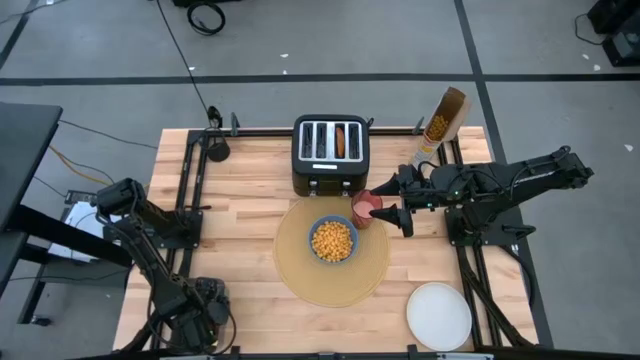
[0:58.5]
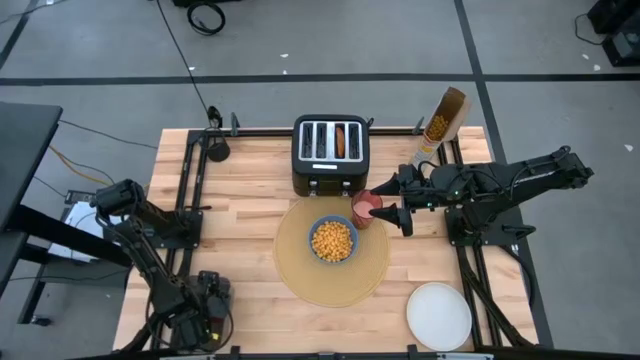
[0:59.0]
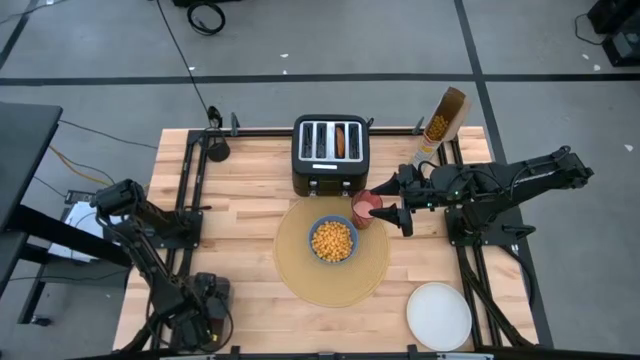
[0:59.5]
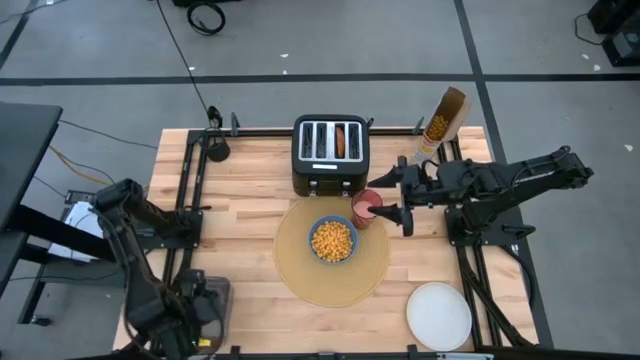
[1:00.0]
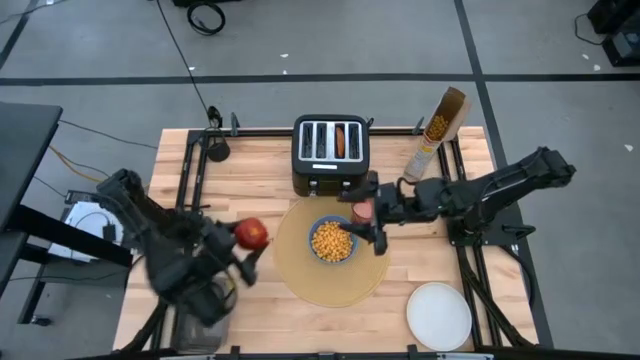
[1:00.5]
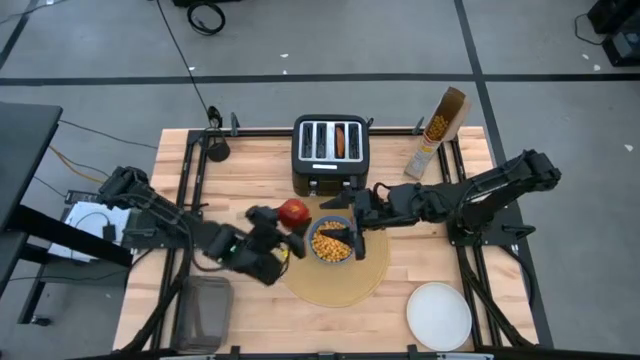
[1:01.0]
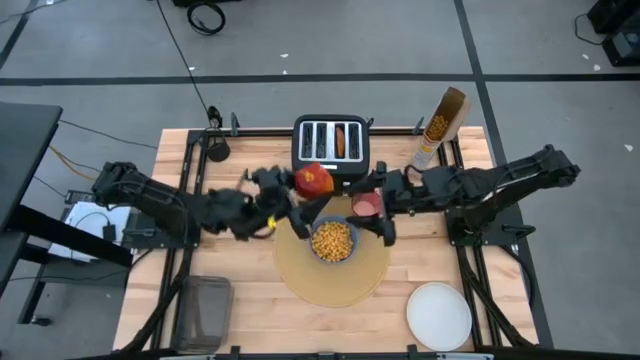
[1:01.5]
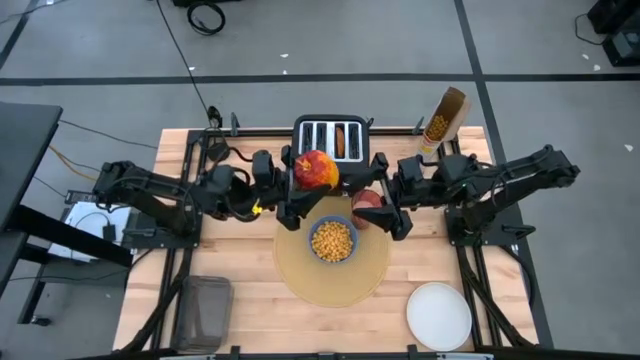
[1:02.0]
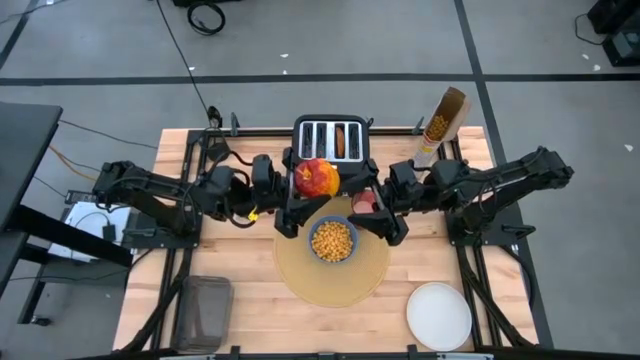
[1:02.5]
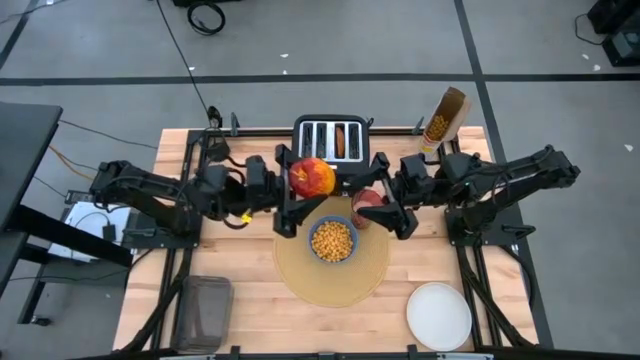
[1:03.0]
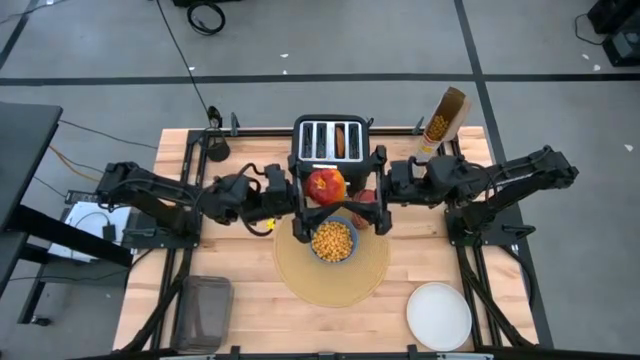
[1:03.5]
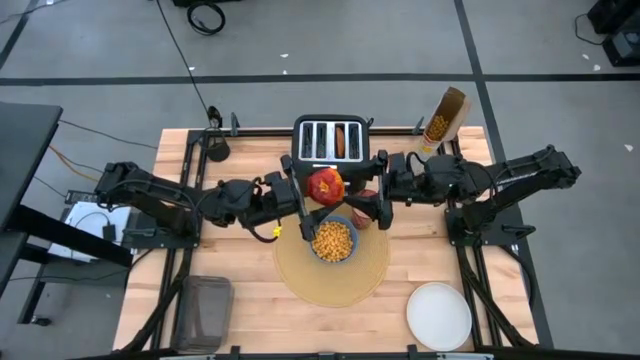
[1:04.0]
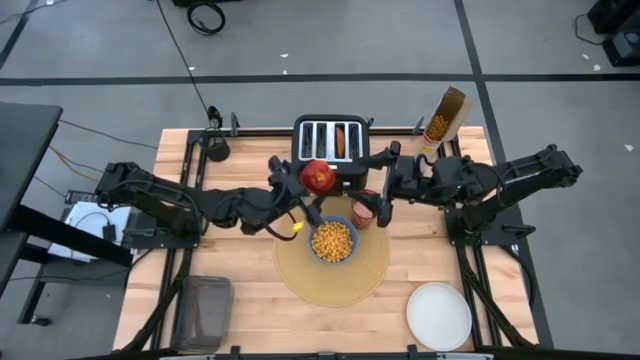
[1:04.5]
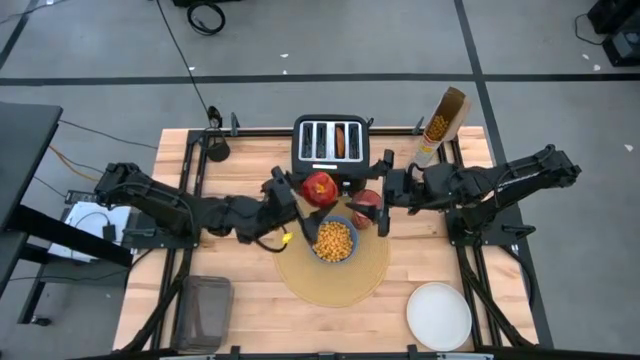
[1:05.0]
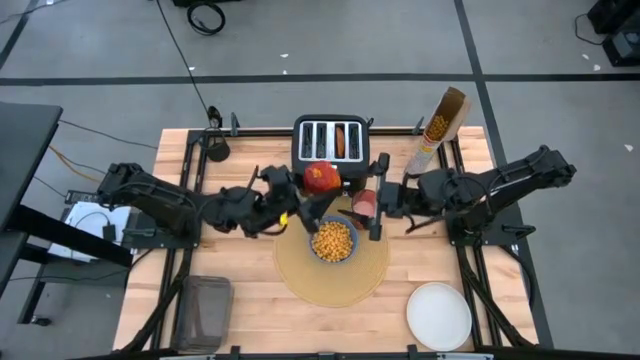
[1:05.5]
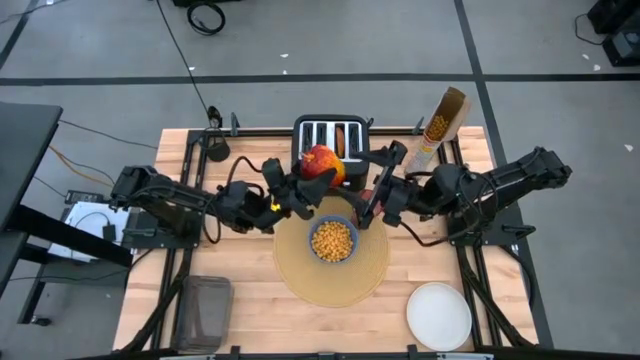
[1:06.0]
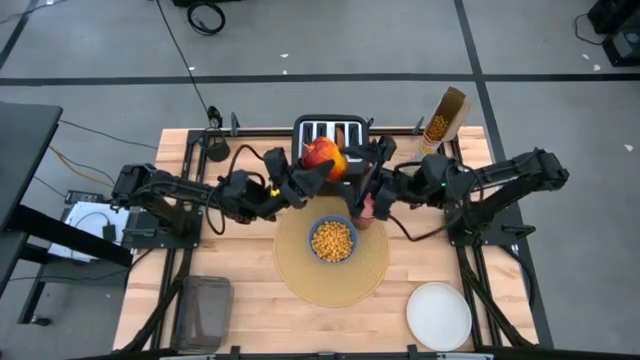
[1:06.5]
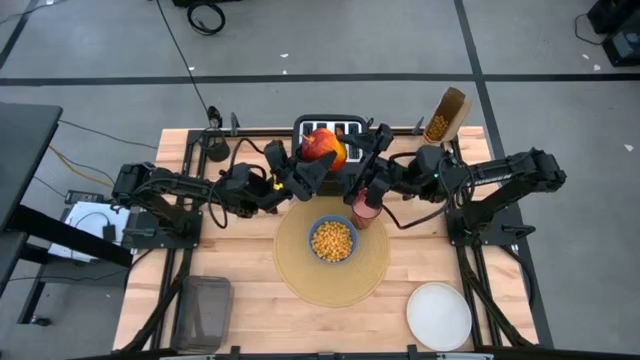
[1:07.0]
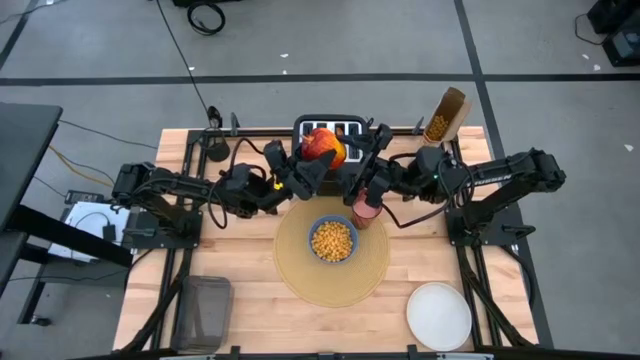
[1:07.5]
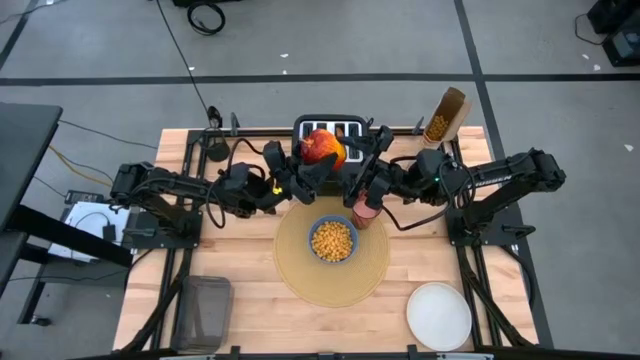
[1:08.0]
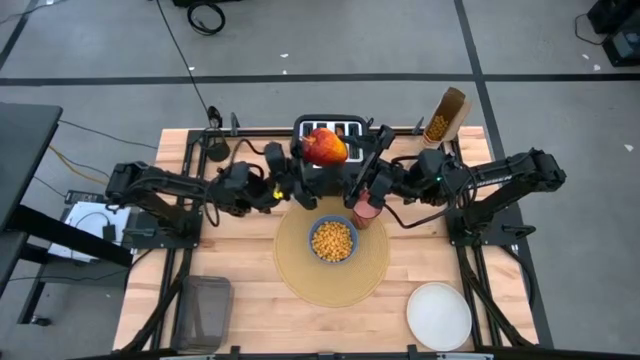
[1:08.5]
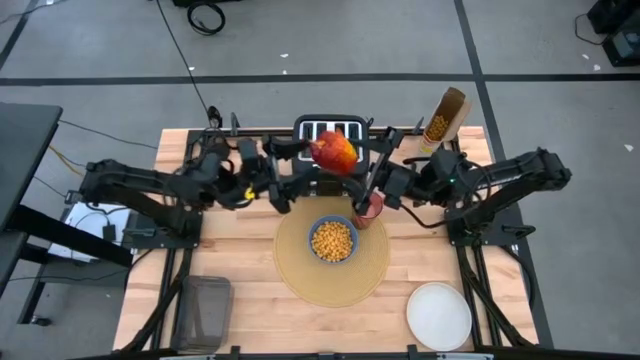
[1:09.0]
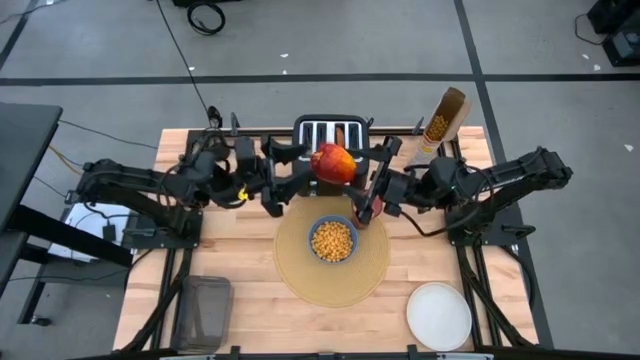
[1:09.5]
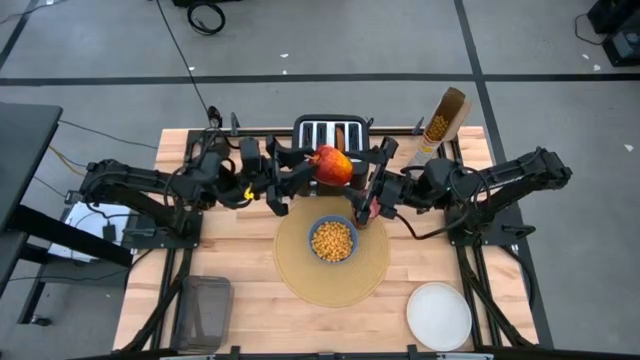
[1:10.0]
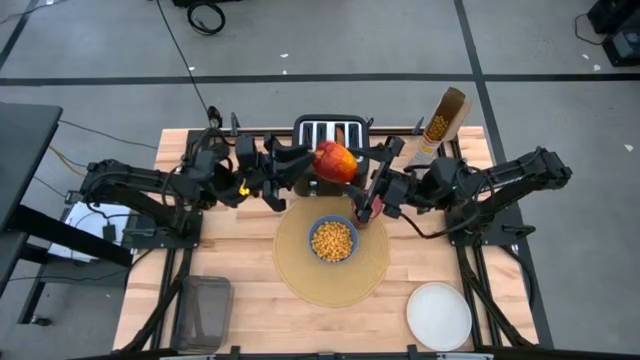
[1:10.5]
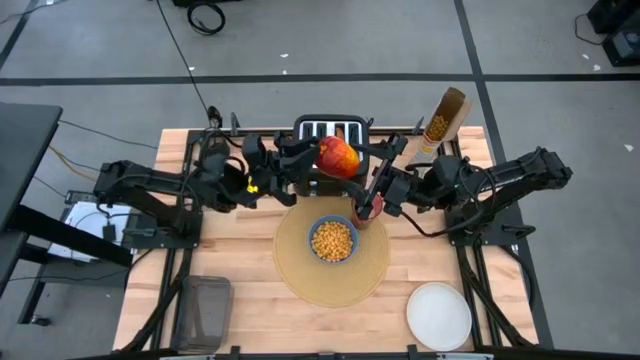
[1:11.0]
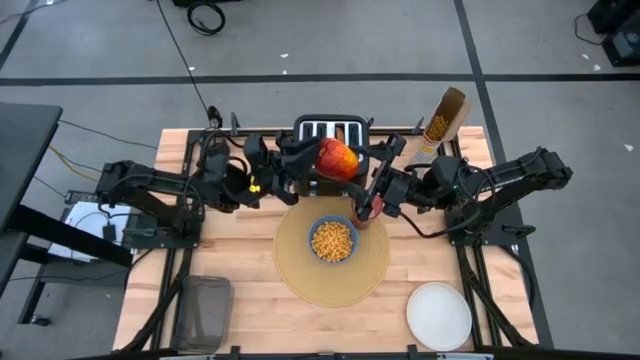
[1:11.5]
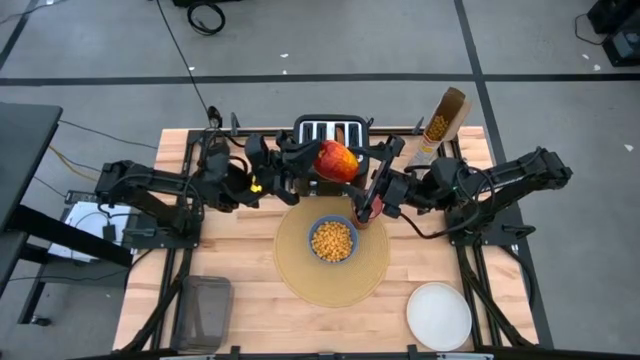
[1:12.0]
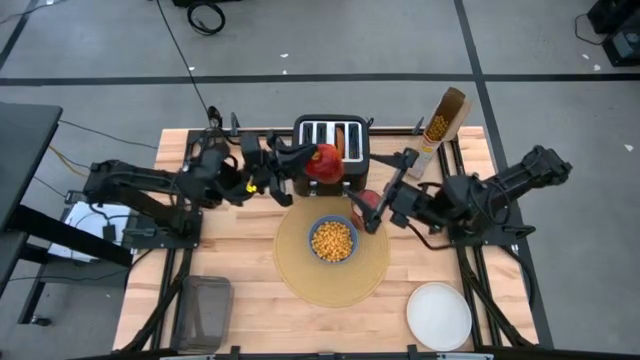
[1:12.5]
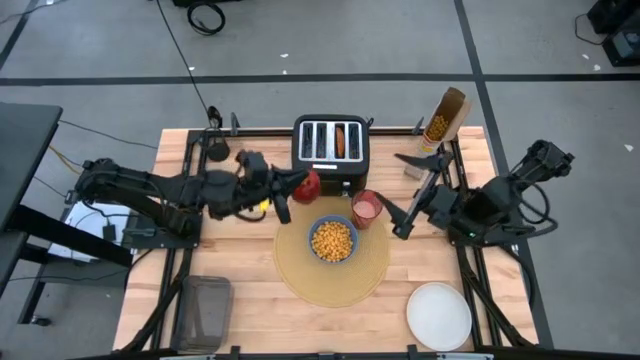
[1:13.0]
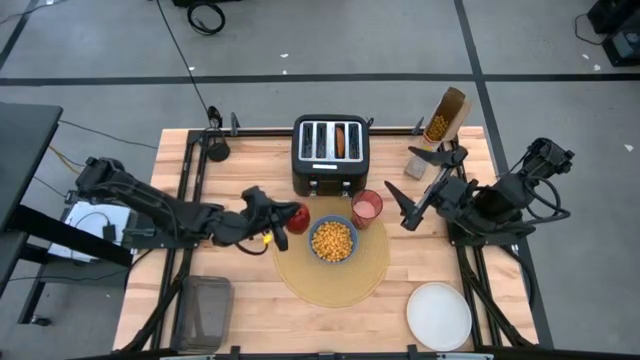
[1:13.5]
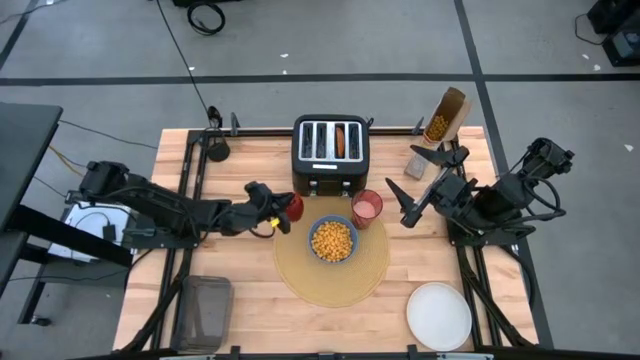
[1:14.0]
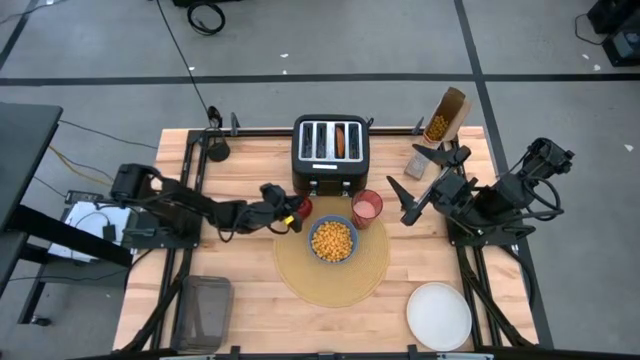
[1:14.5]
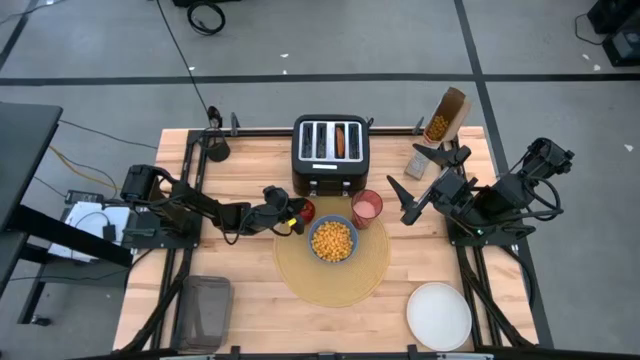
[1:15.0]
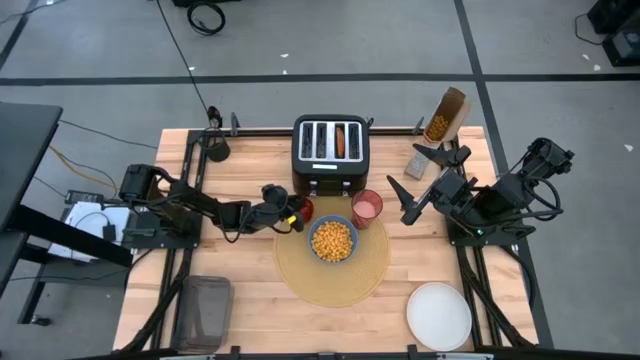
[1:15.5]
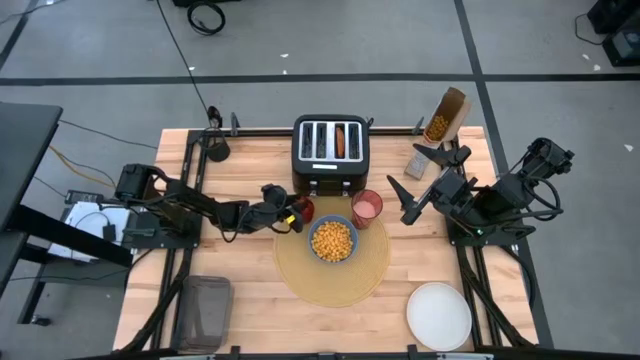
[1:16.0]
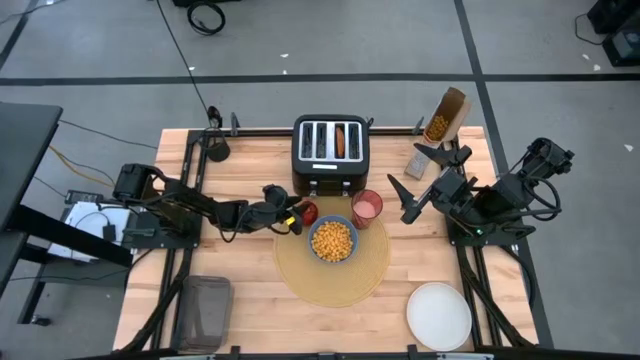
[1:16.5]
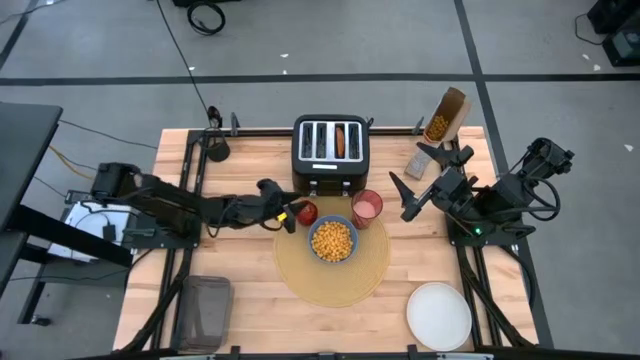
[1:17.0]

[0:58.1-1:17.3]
Task: Arrange a breakfast setting
Put the apple on the yellow tablemat

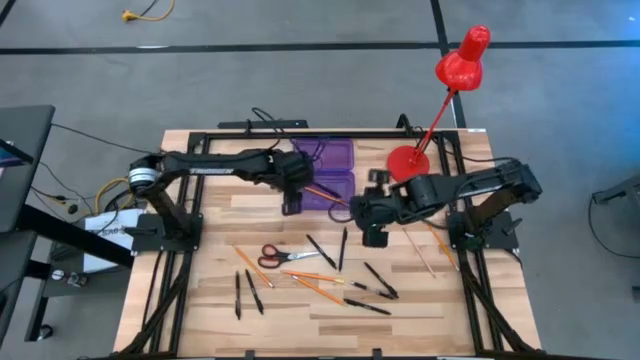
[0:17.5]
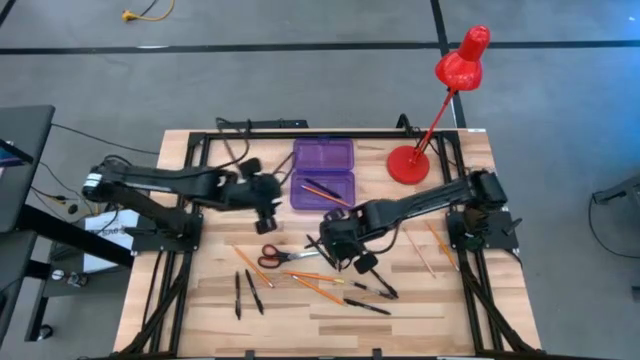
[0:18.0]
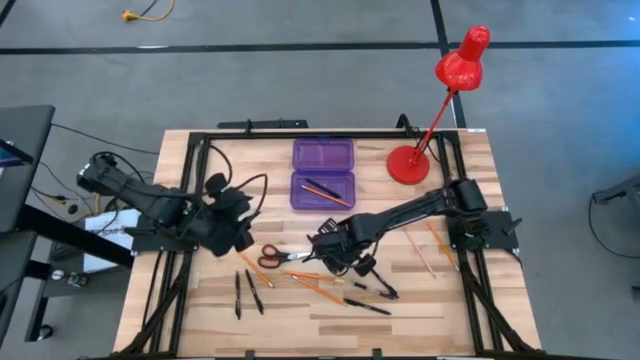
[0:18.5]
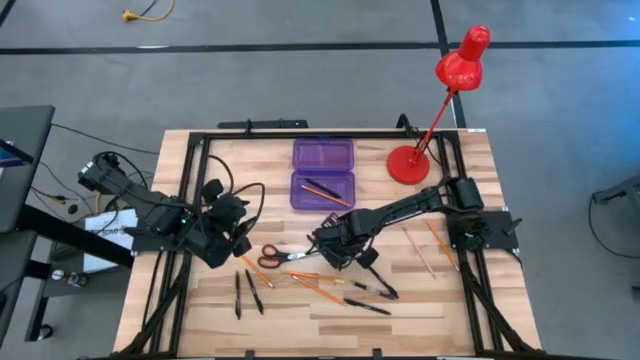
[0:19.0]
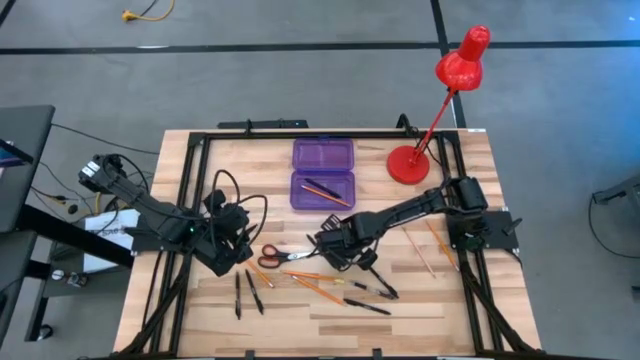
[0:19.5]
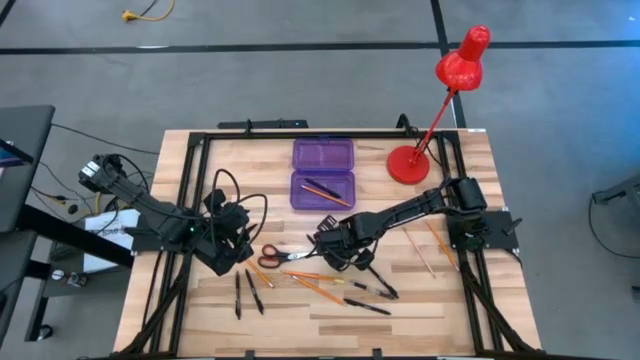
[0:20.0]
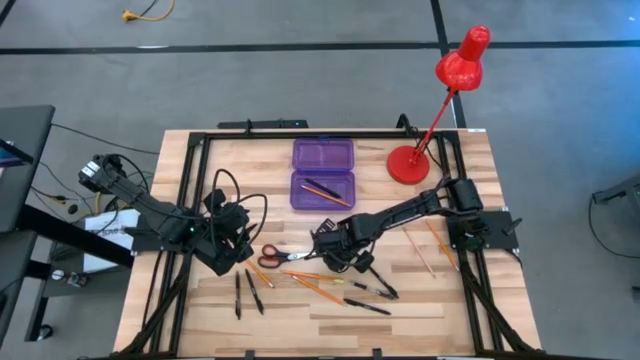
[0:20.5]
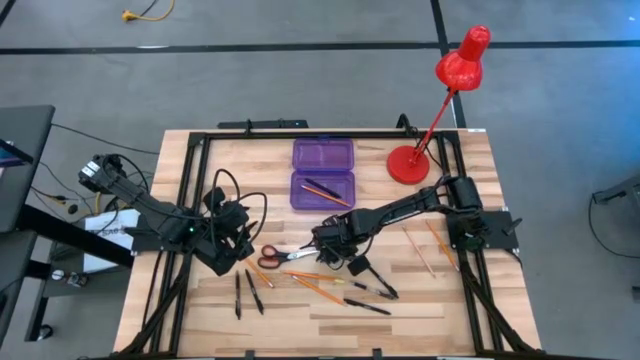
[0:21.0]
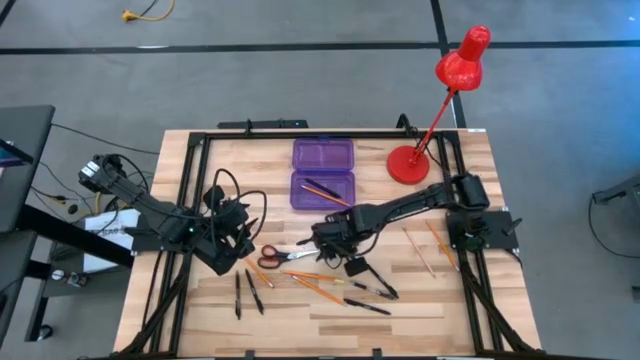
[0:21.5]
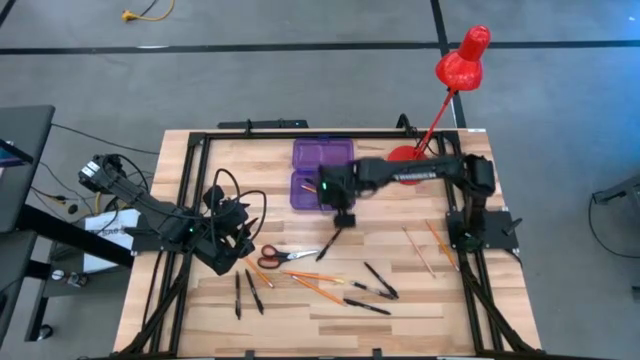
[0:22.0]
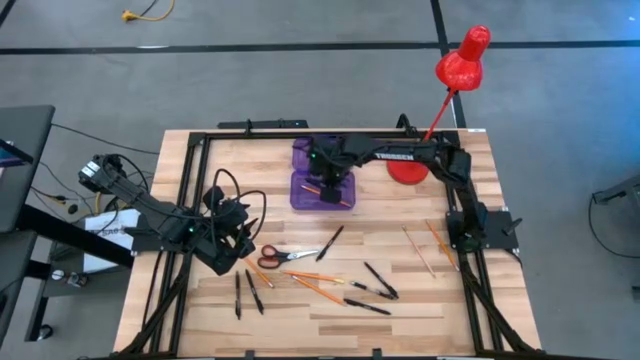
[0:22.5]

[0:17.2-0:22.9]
Task: Pick & place school supplies into a supply box
Put the black pen into the purple supply box
